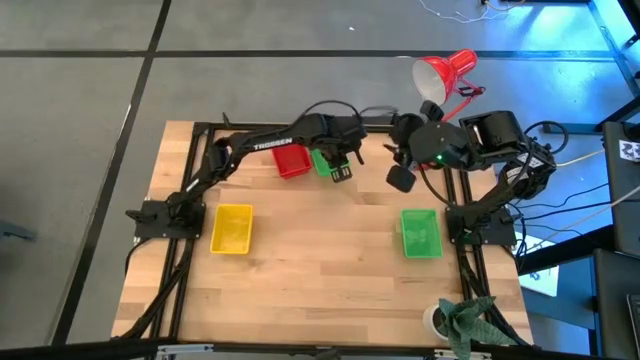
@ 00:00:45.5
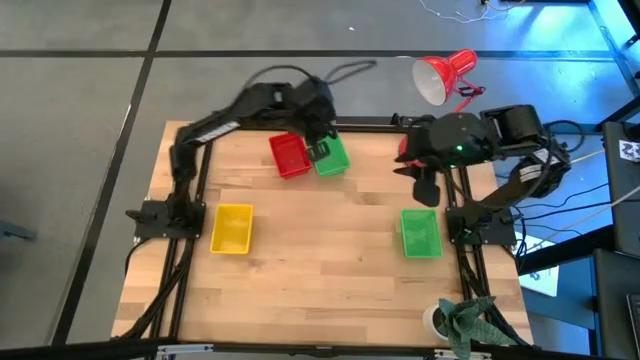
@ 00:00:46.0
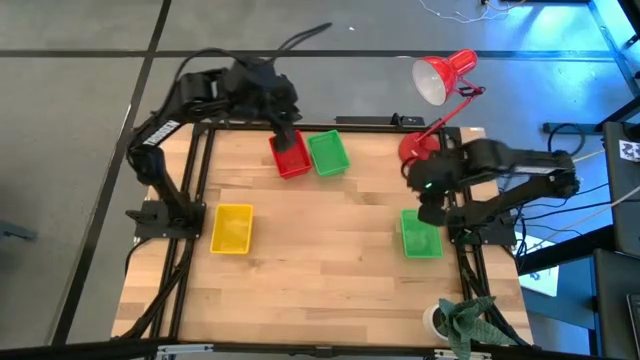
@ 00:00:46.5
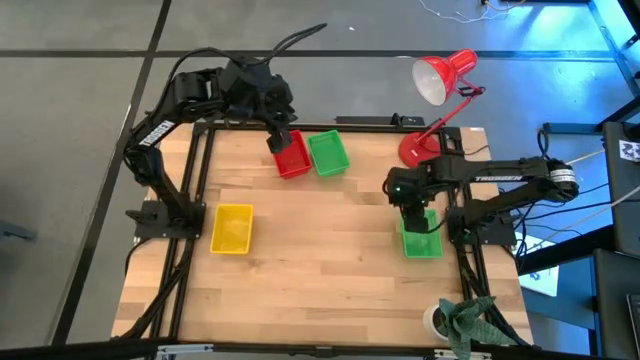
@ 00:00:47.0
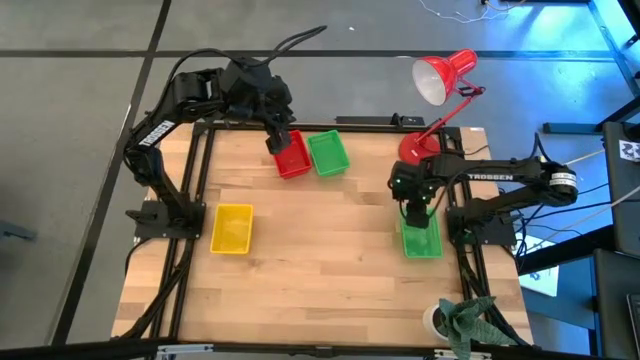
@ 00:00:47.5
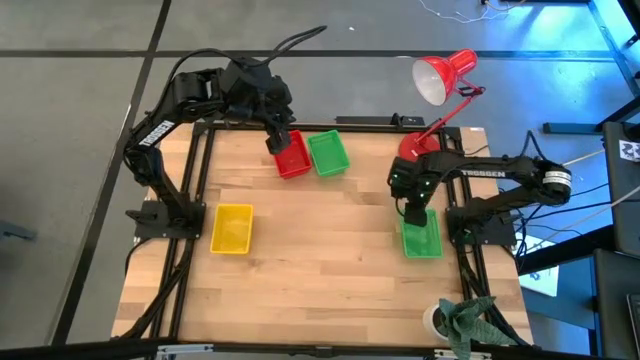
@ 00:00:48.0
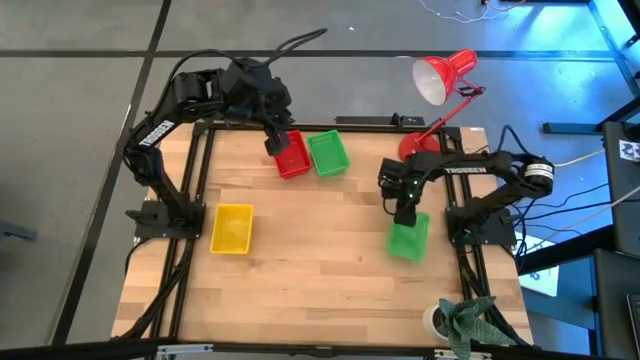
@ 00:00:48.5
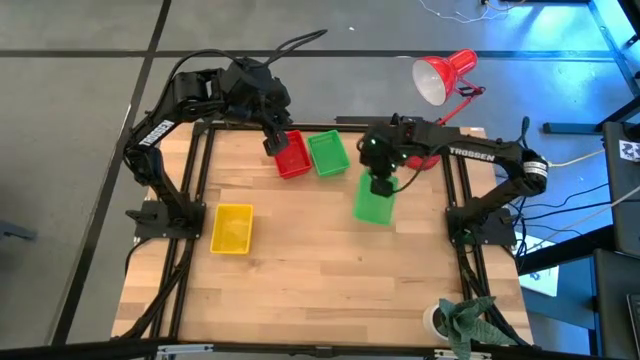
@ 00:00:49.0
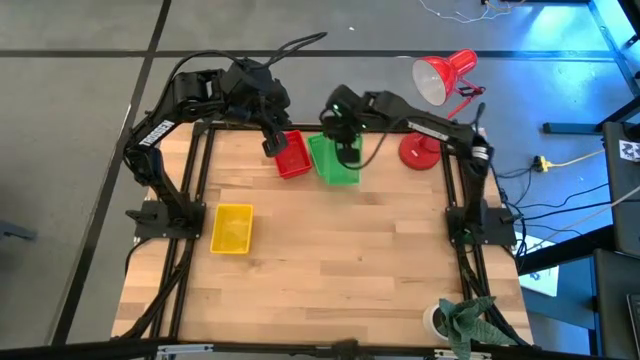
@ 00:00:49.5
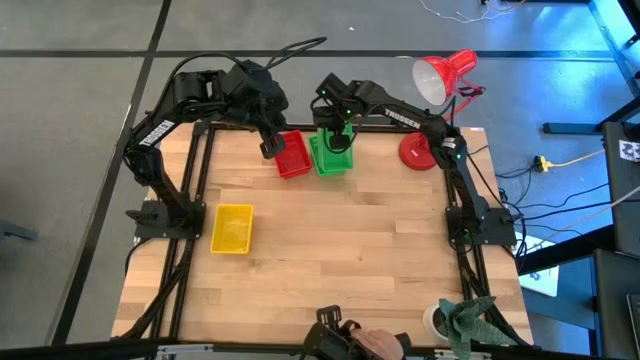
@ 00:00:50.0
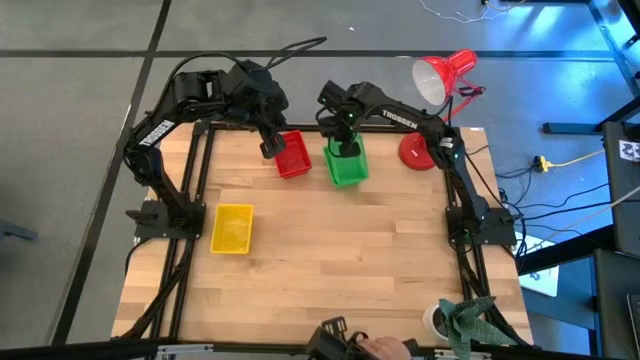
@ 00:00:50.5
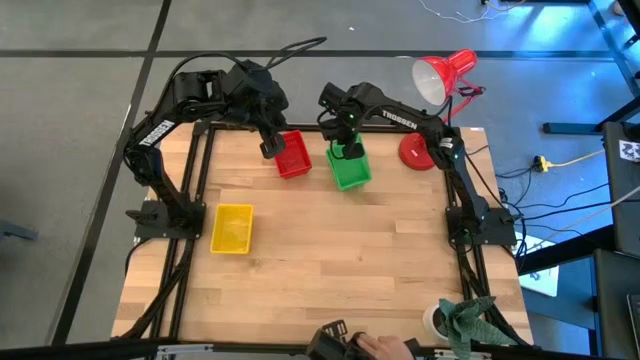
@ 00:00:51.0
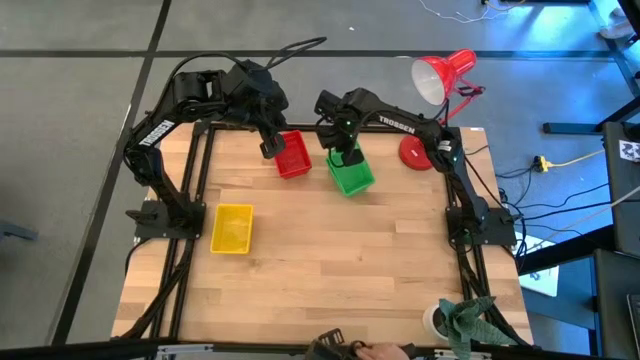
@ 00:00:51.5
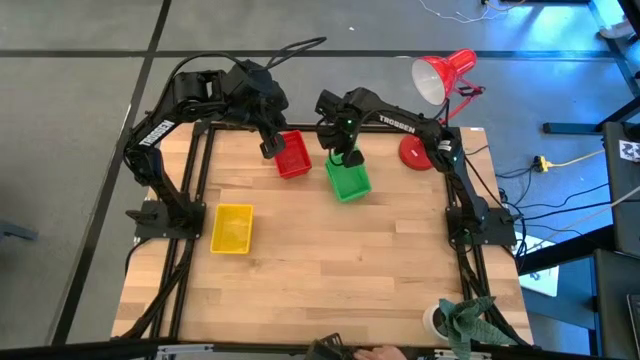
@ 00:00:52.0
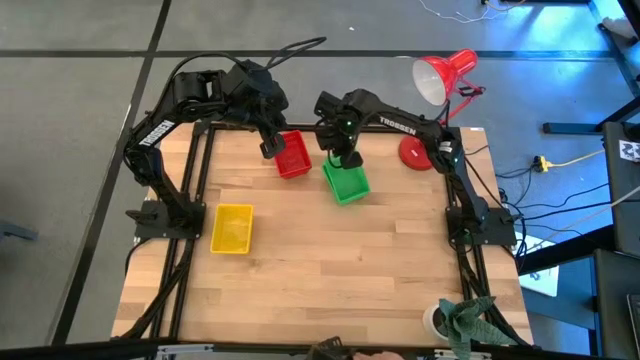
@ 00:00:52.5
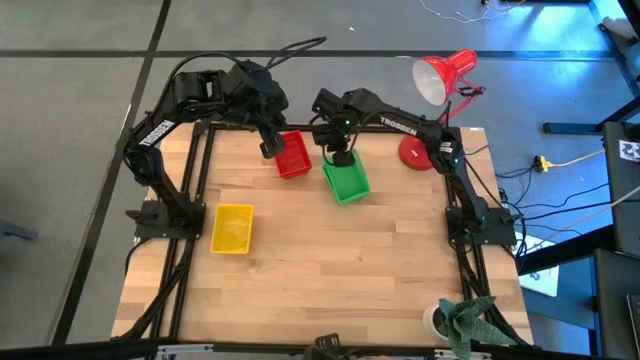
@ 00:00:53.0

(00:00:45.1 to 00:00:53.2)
Stack the bottom green bin on the green bin

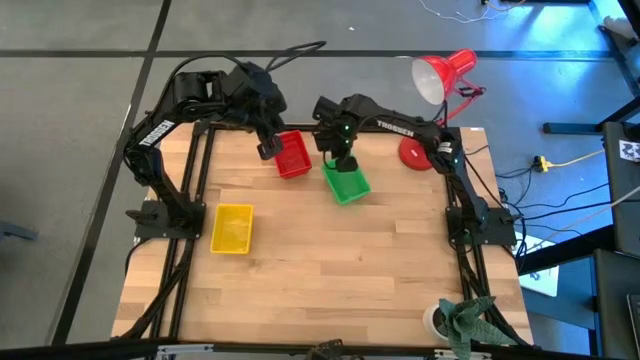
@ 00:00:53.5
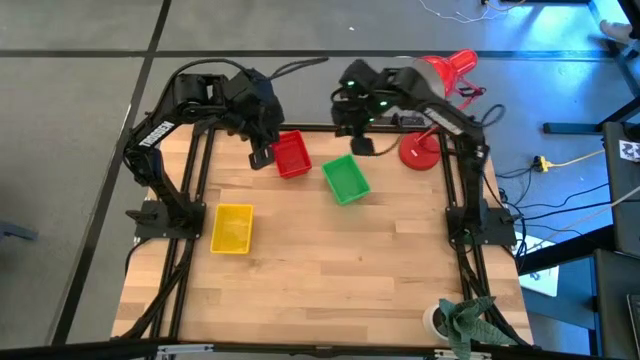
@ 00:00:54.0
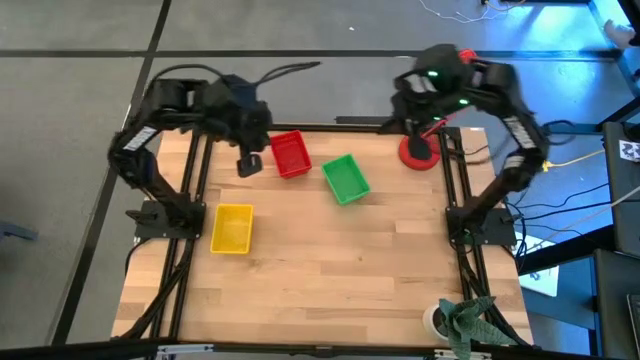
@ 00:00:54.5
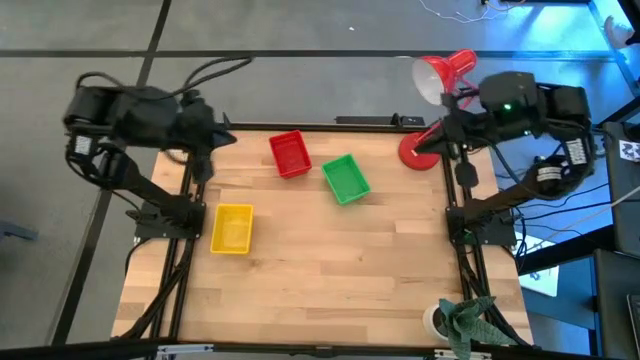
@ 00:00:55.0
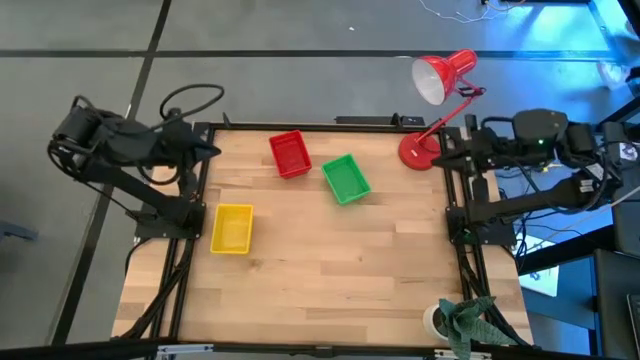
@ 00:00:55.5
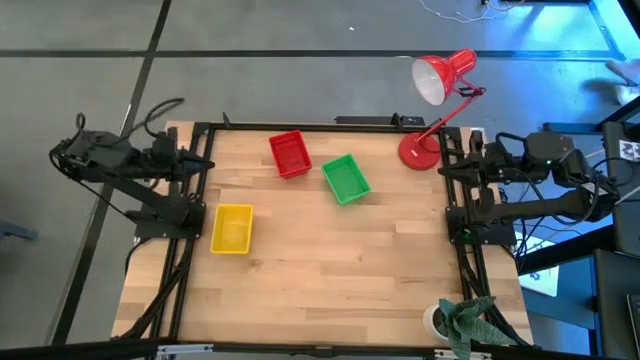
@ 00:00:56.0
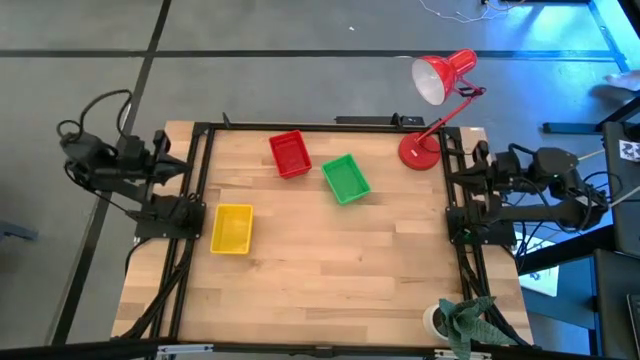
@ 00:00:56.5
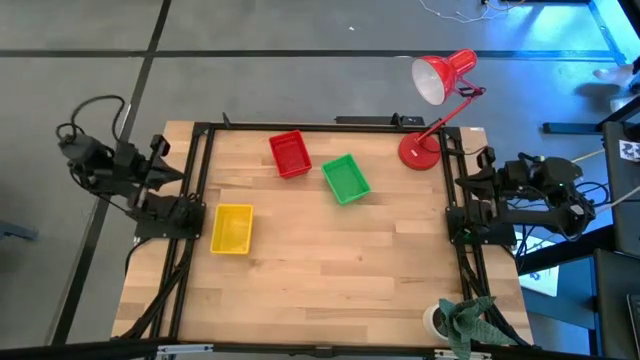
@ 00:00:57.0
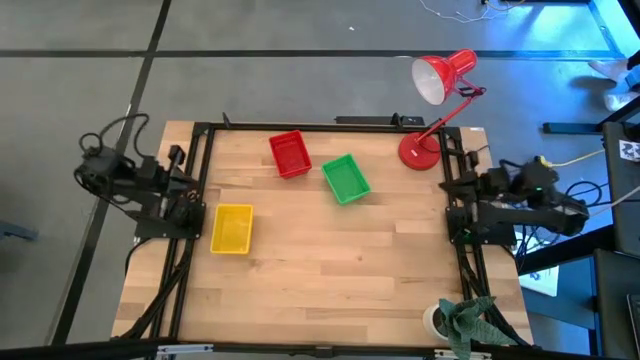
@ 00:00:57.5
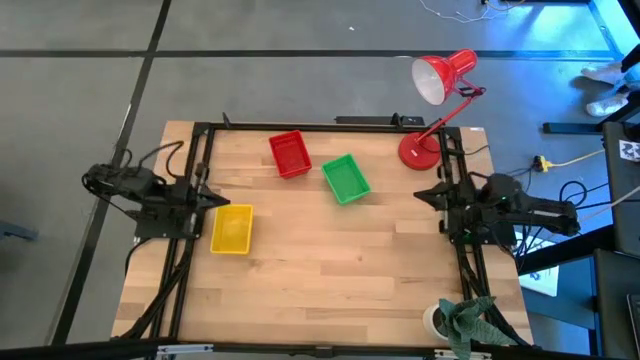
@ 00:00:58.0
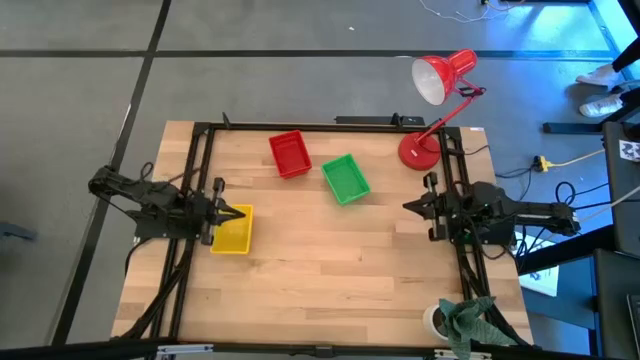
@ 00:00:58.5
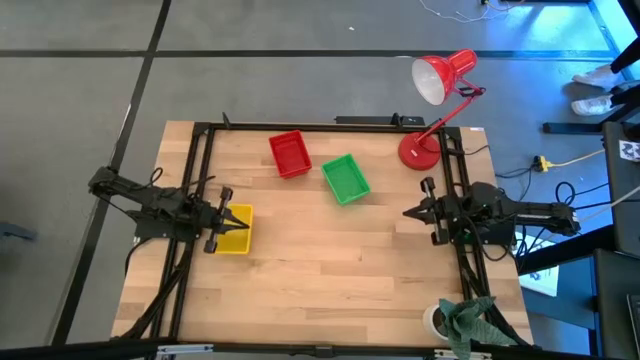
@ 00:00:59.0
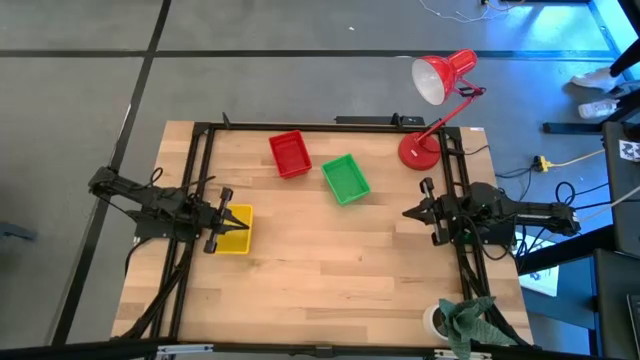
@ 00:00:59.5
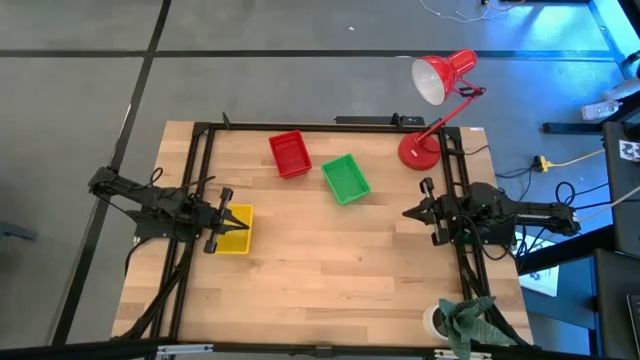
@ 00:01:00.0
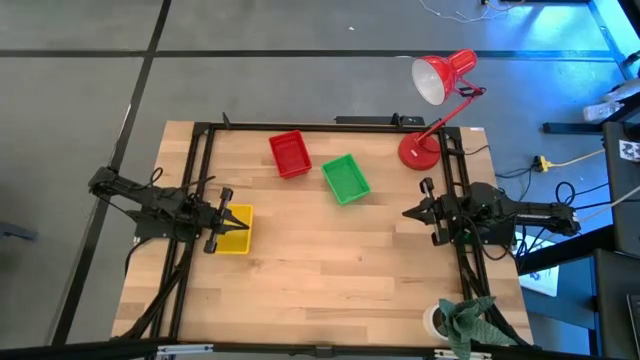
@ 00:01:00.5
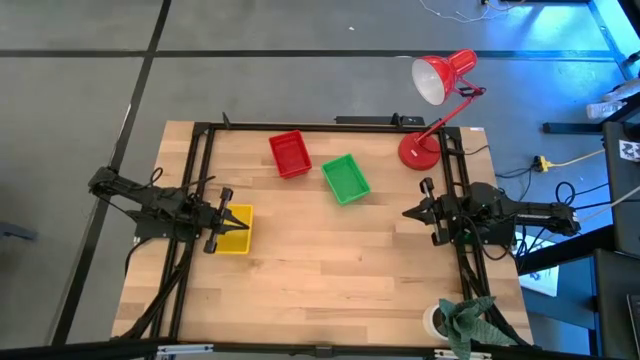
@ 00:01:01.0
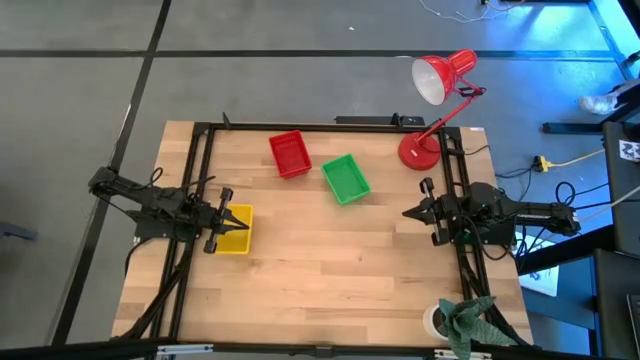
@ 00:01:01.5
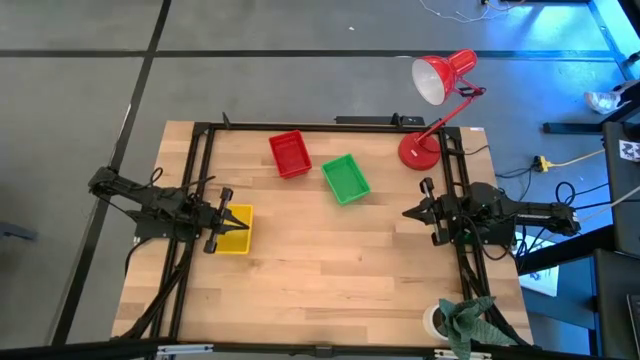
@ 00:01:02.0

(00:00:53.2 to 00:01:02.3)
Return to Home Position
